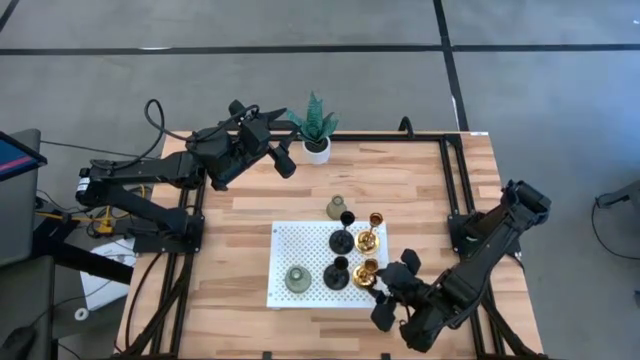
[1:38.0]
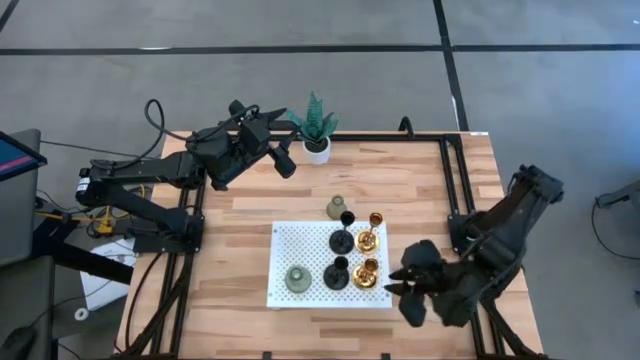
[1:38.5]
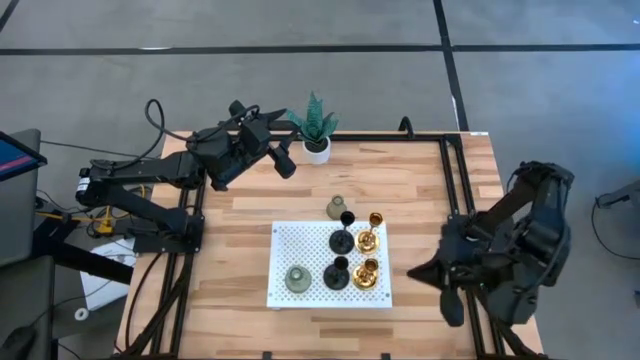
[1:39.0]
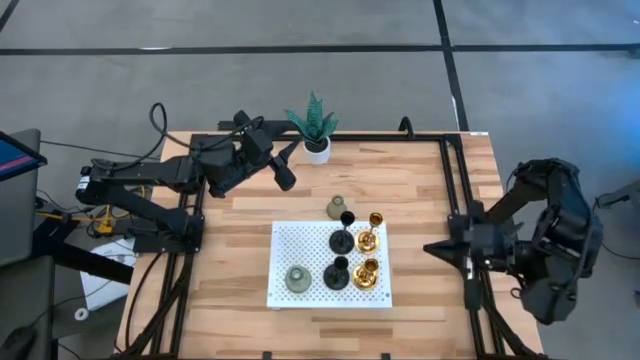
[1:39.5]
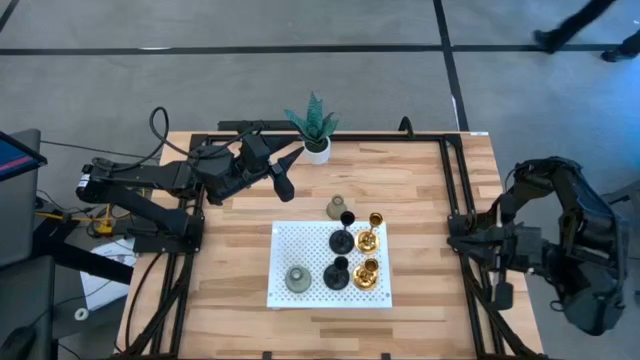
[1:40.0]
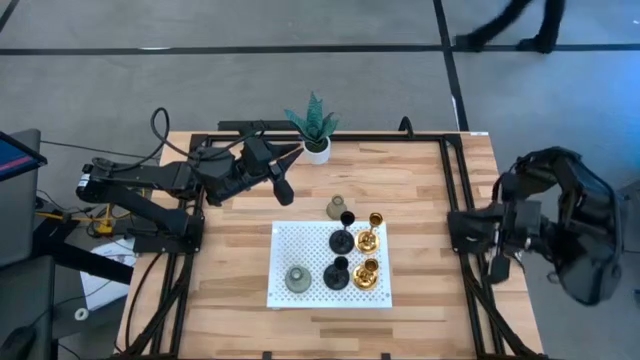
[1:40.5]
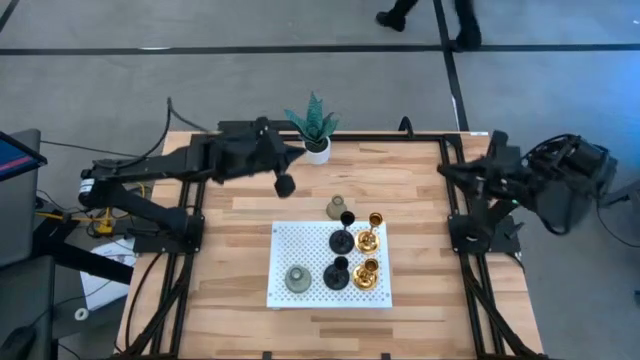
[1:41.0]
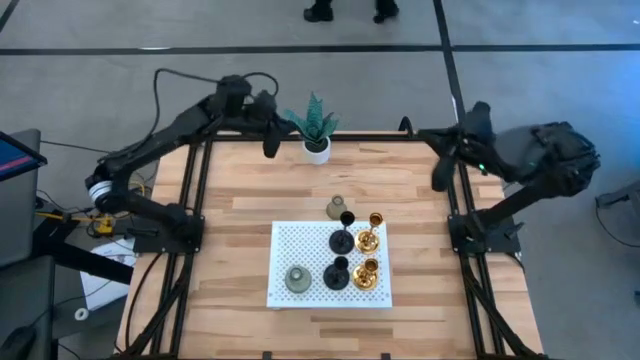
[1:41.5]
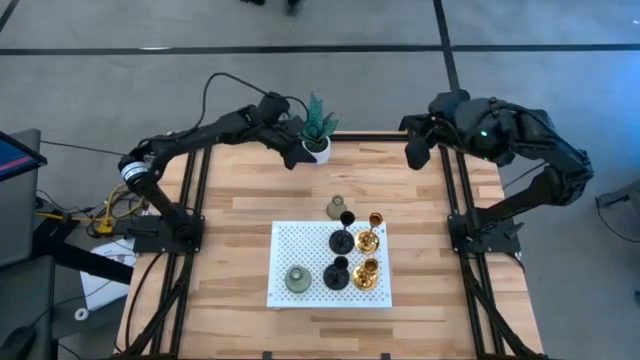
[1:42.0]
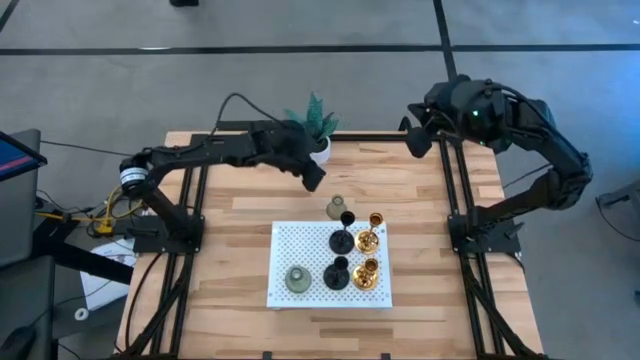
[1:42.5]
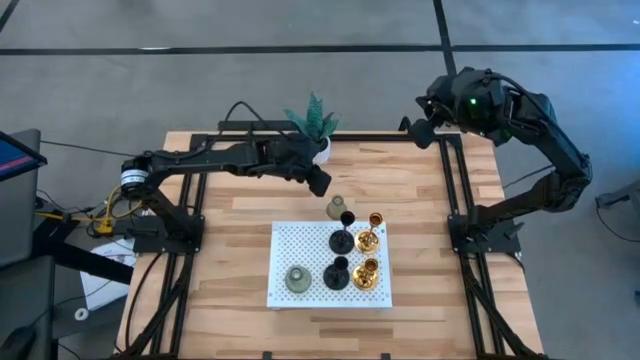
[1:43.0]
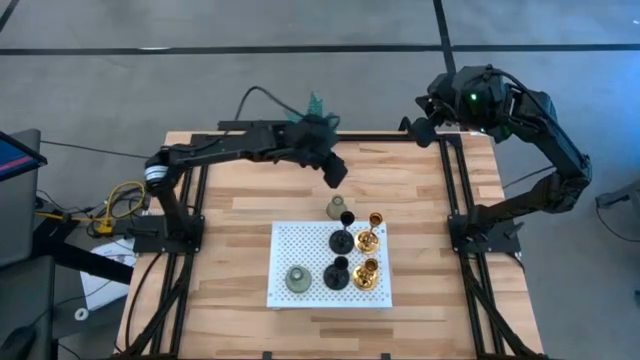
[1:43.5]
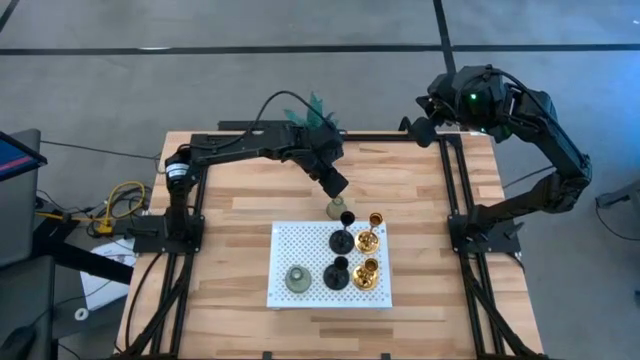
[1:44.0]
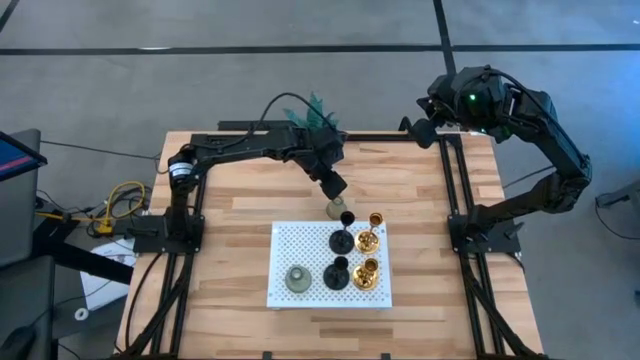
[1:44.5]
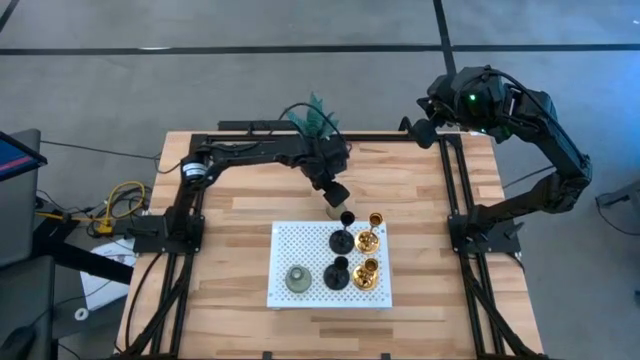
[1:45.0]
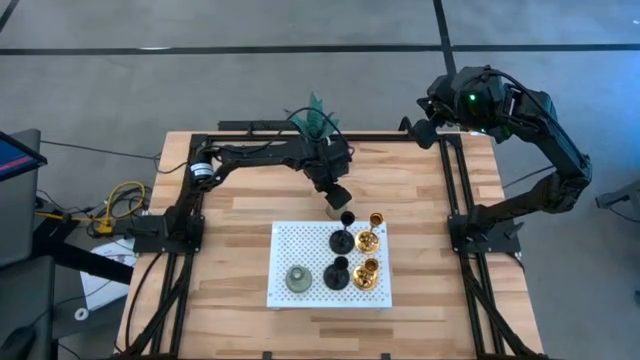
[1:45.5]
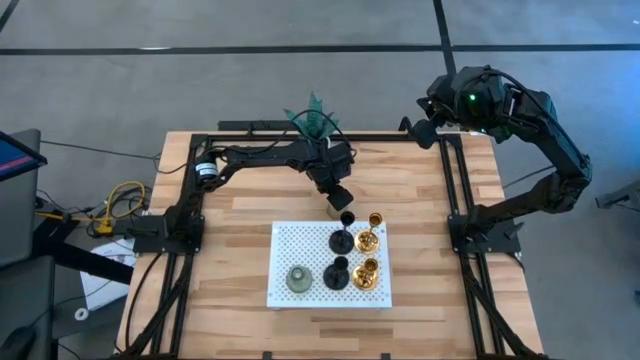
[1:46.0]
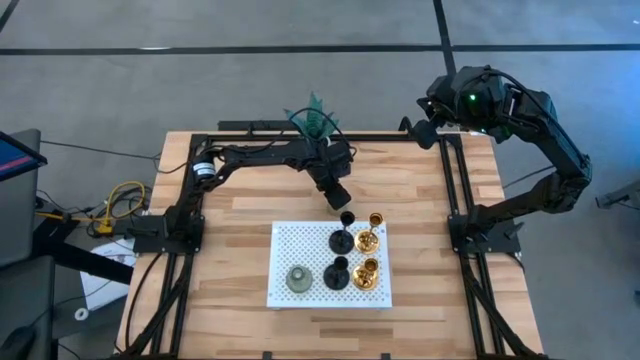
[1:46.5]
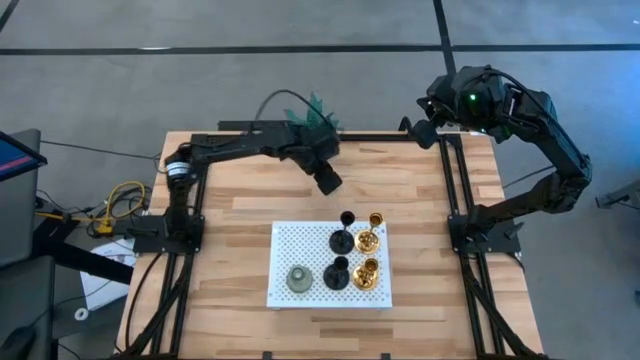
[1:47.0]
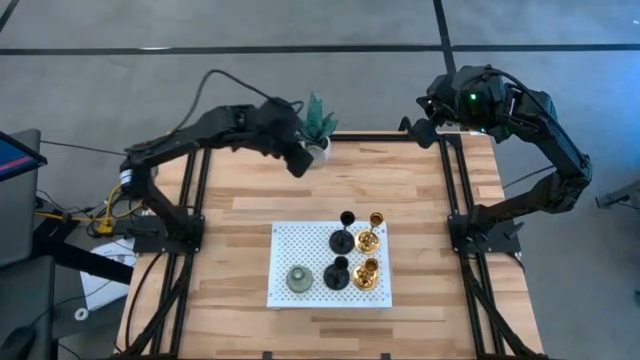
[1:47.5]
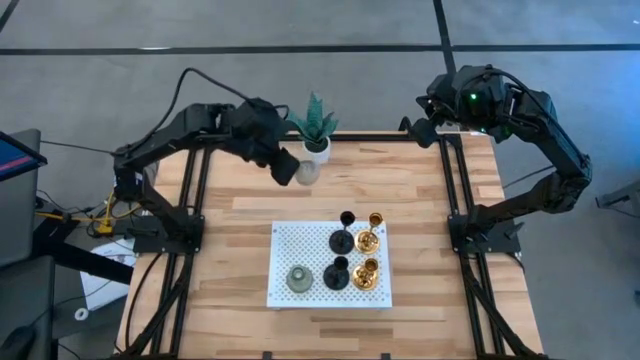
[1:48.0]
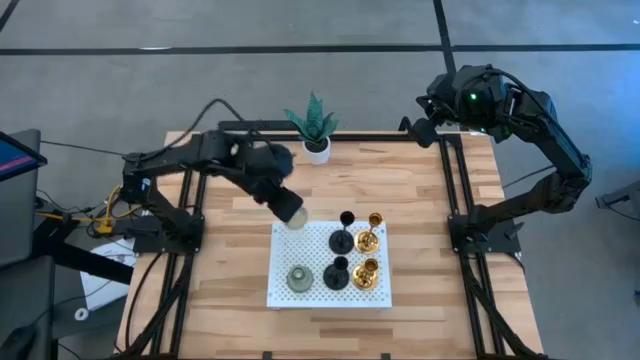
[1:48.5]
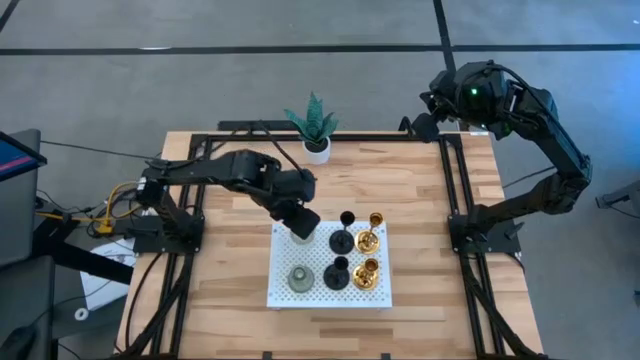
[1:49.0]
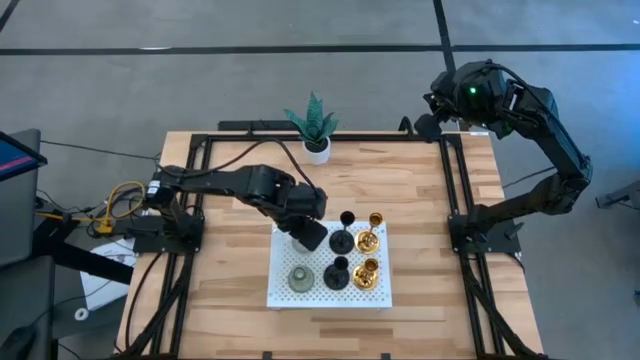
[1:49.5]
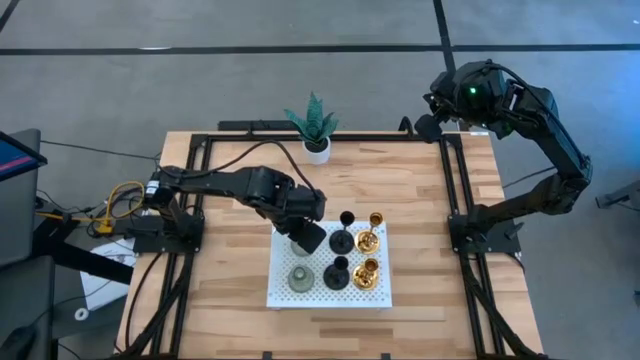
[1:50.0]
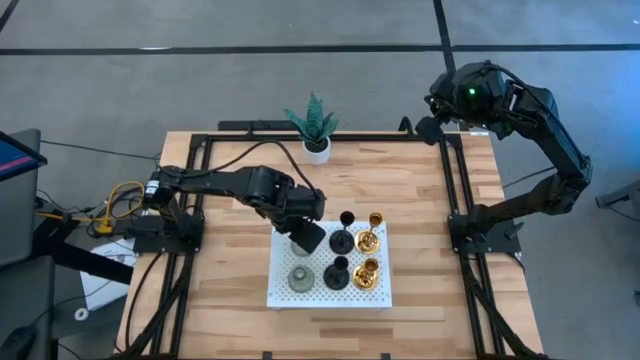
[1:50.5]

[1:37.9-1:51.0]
Task: Pick & Place candle stick holders
Align the transparent candle holder with the other transparent candle holder on the shelf

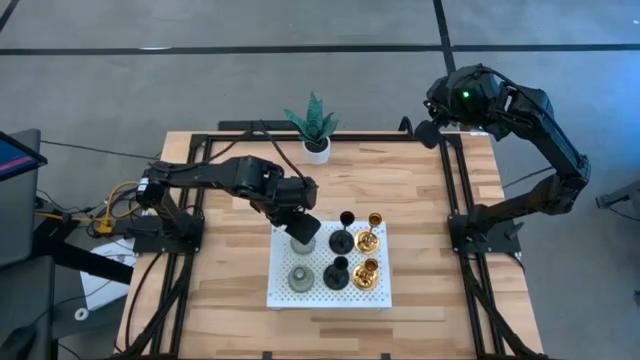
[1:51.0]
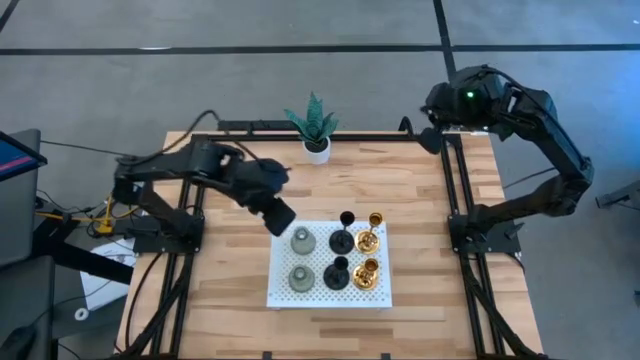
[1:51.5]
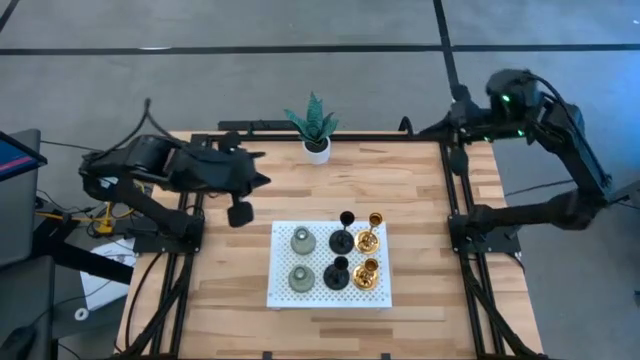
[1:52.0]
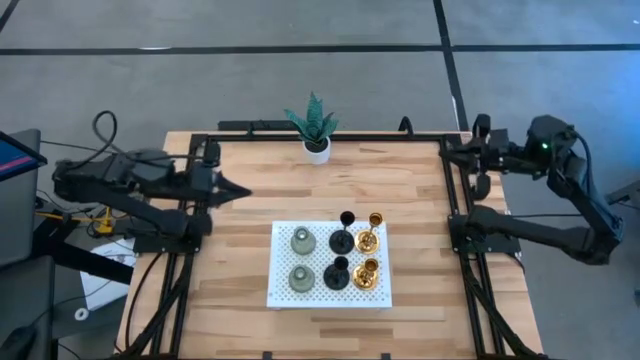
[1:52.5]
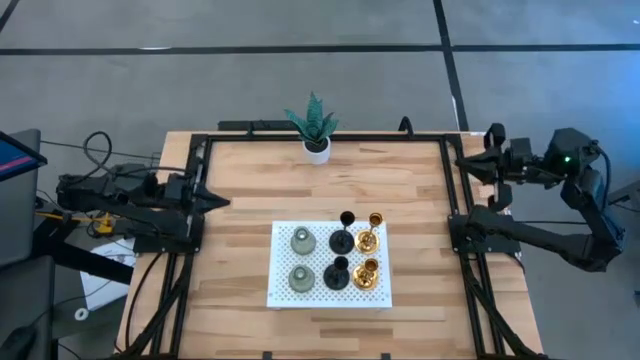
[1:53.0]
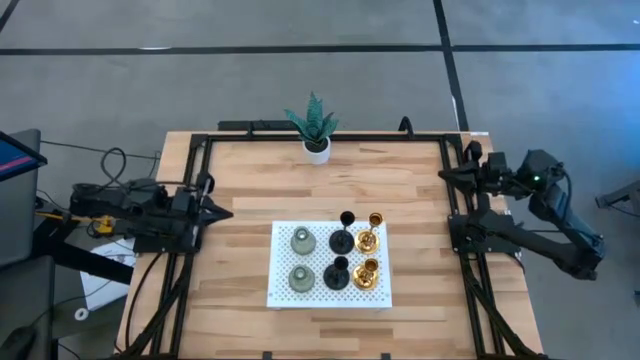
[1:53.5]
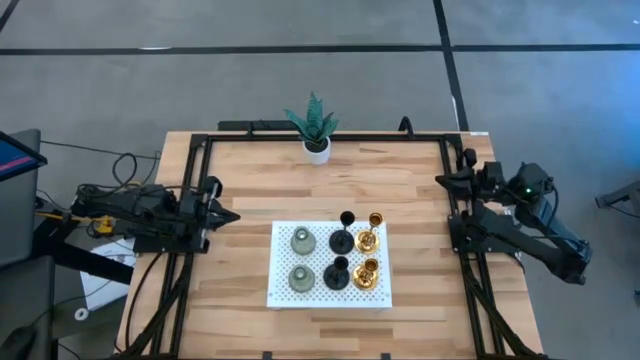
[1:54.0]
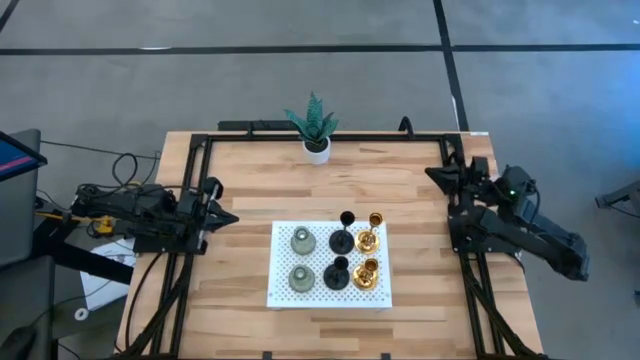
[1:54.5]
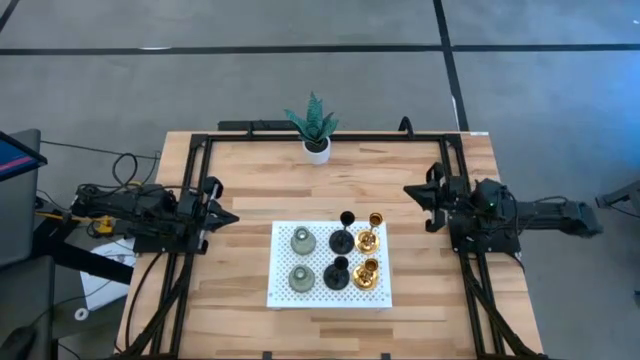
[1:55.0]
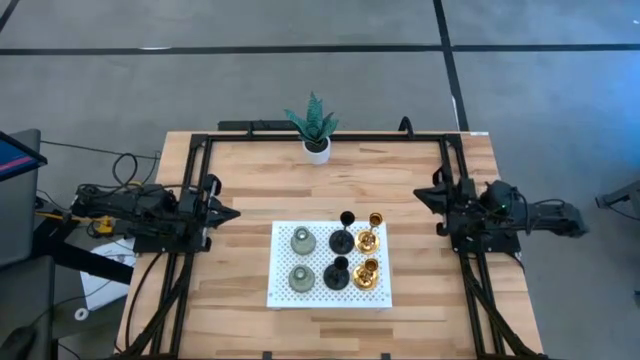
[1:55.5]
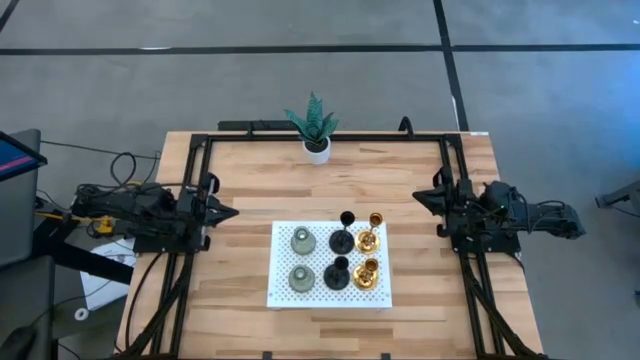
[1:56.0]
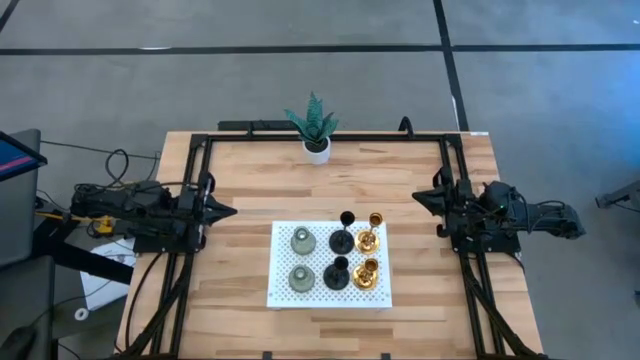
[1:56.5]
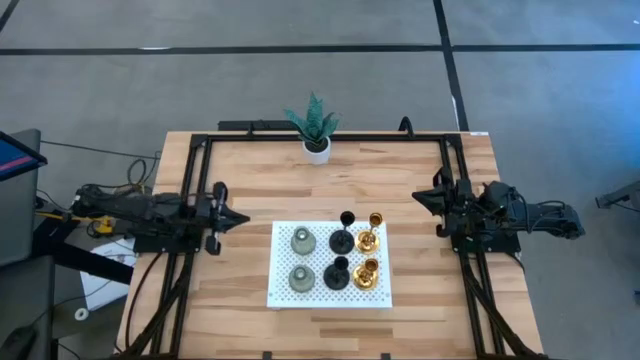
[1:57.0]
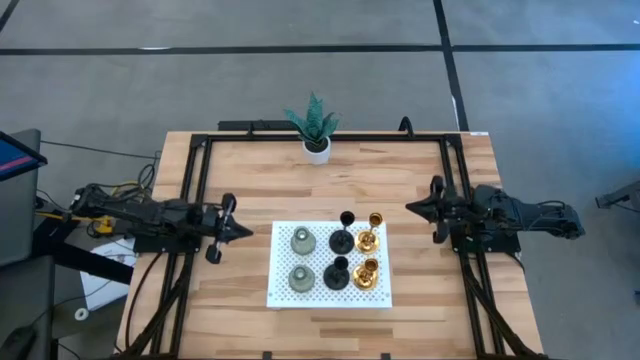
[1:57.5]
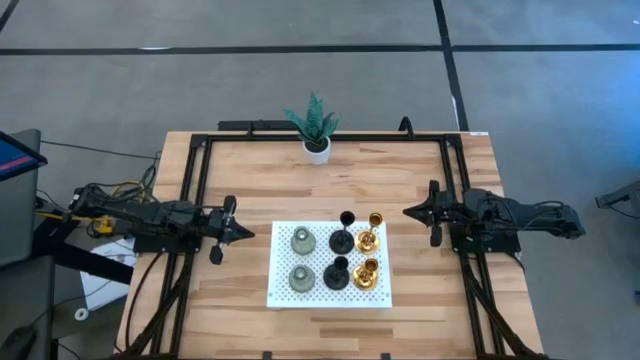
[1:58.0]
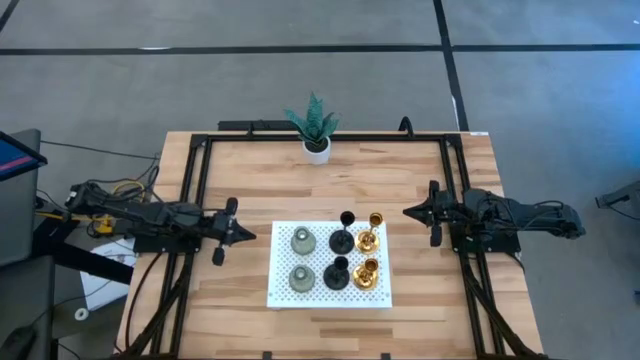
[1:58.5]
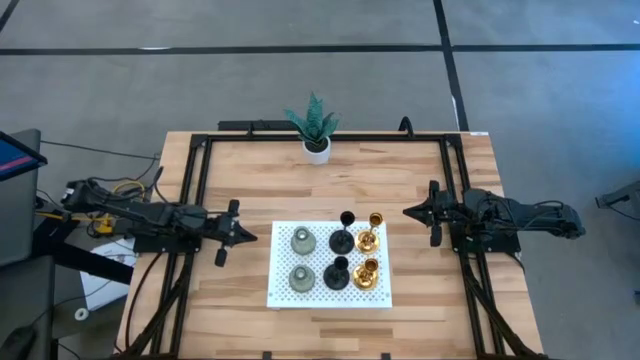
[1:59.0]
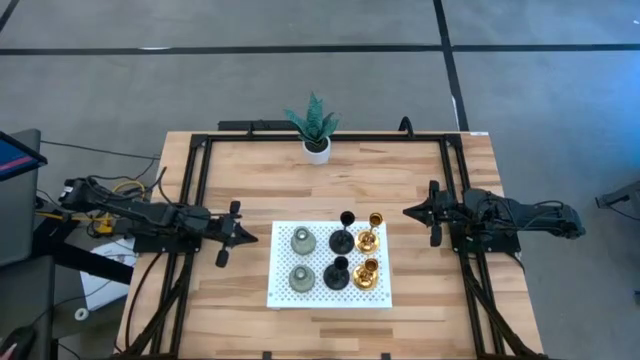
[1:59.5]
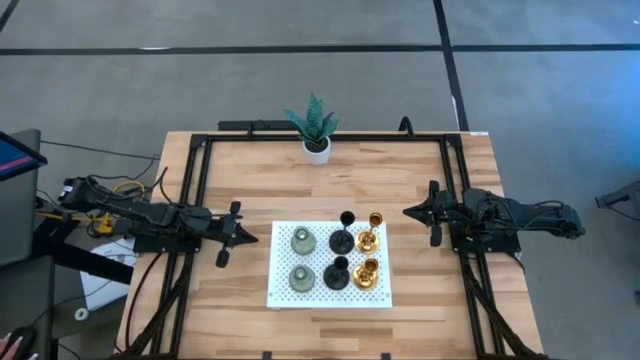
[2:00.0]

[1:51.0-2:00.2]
Return to Home Position
